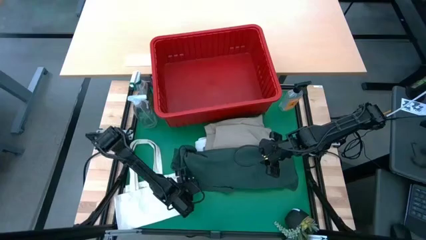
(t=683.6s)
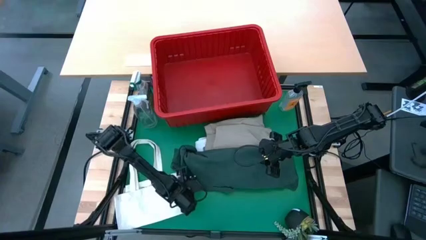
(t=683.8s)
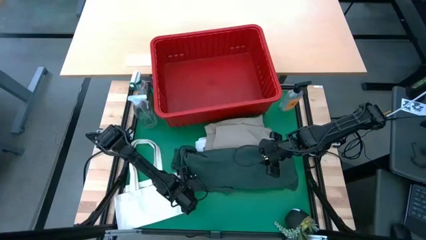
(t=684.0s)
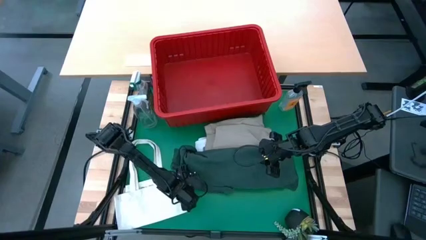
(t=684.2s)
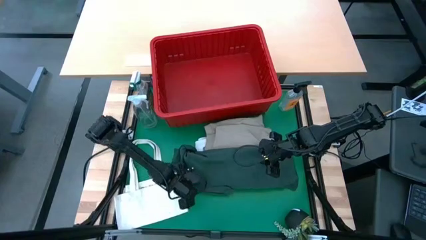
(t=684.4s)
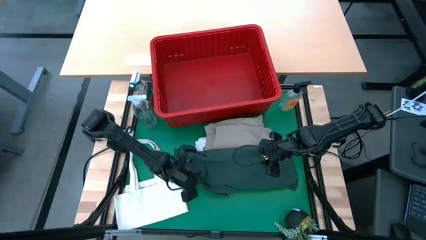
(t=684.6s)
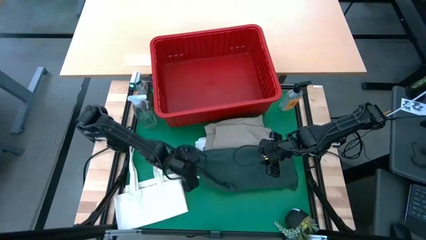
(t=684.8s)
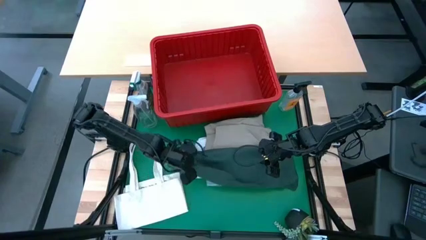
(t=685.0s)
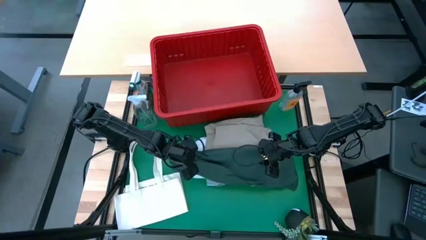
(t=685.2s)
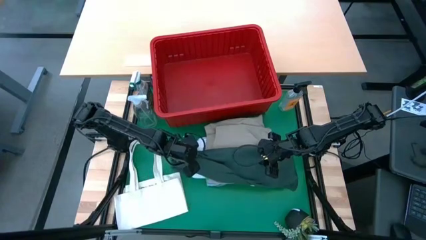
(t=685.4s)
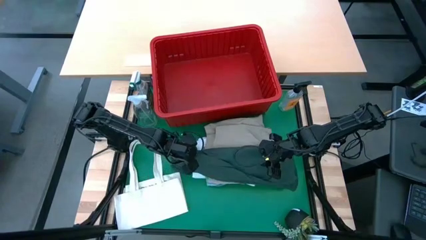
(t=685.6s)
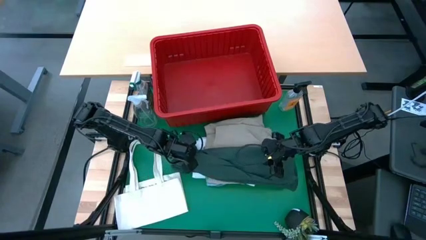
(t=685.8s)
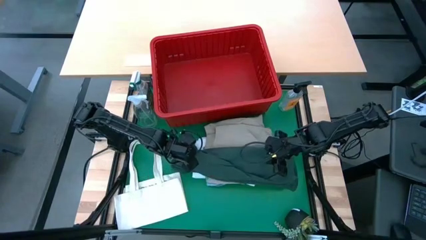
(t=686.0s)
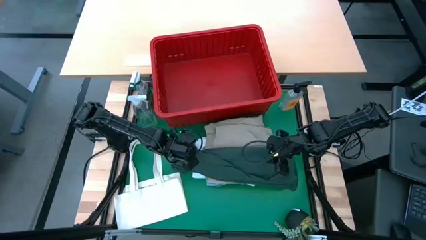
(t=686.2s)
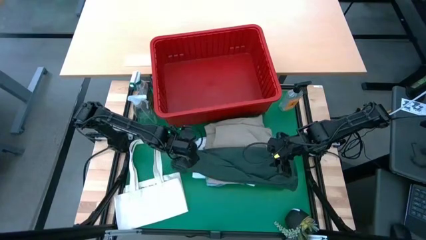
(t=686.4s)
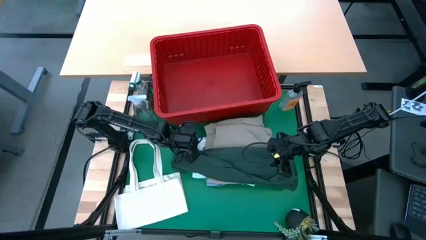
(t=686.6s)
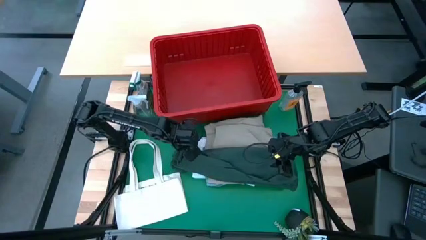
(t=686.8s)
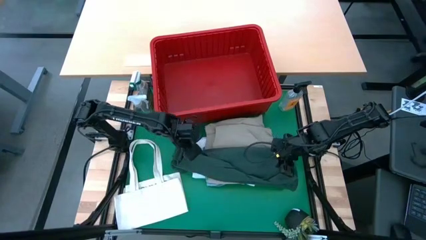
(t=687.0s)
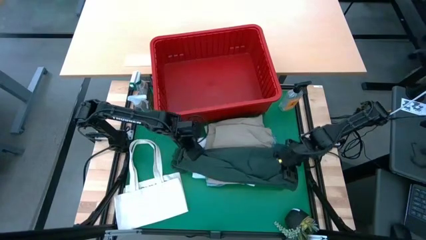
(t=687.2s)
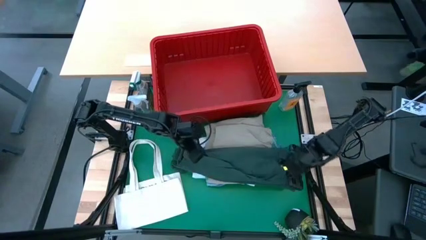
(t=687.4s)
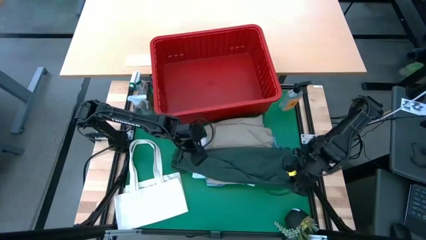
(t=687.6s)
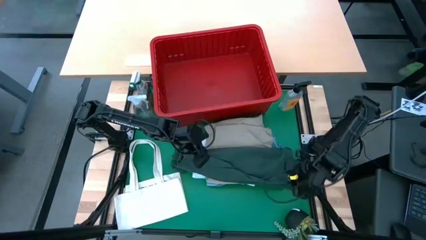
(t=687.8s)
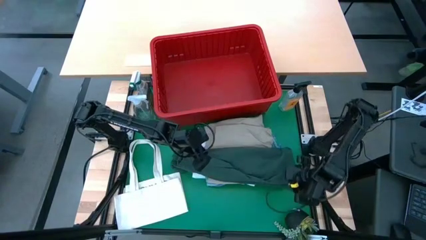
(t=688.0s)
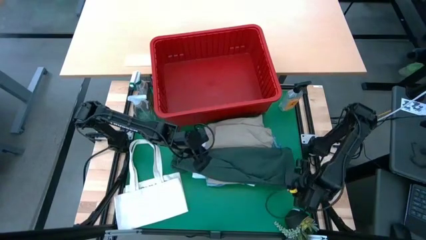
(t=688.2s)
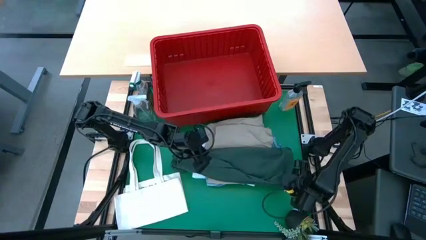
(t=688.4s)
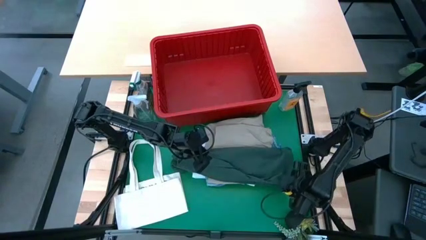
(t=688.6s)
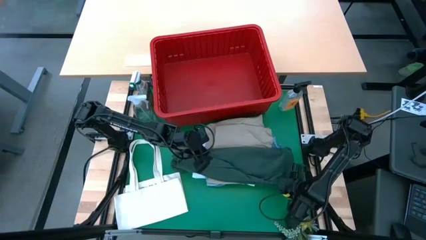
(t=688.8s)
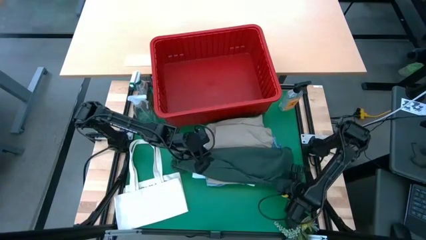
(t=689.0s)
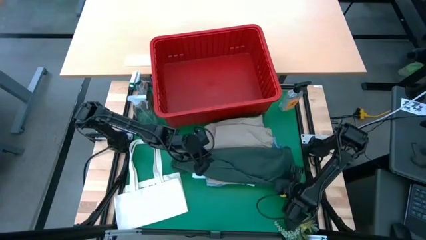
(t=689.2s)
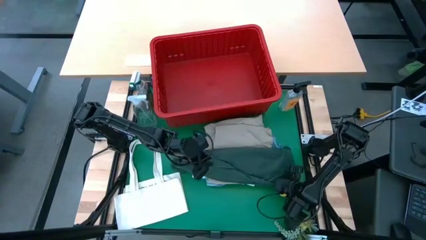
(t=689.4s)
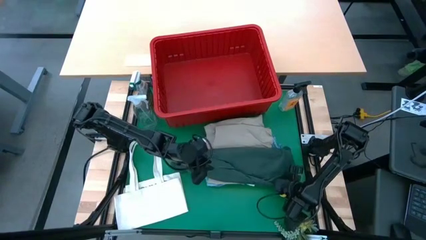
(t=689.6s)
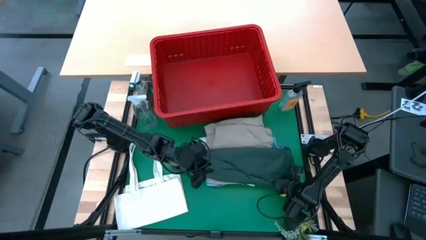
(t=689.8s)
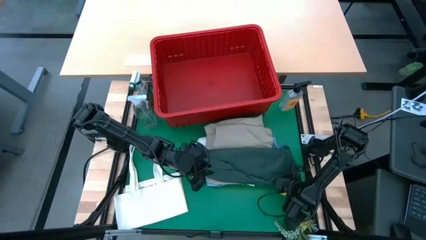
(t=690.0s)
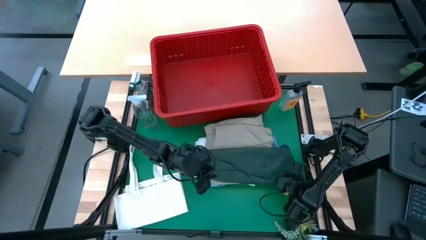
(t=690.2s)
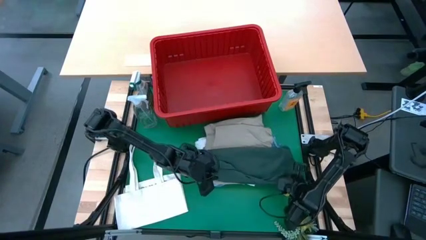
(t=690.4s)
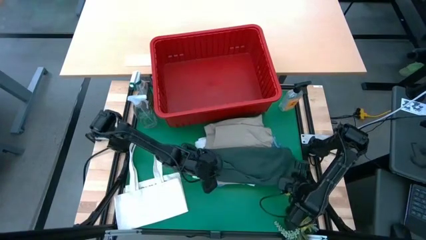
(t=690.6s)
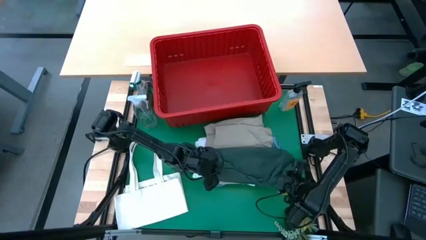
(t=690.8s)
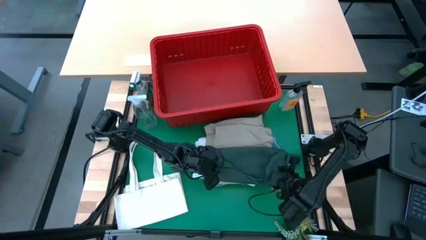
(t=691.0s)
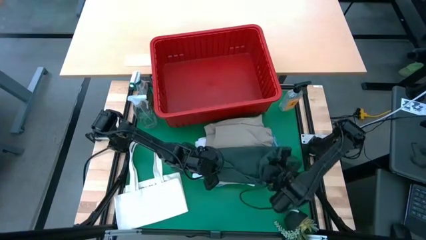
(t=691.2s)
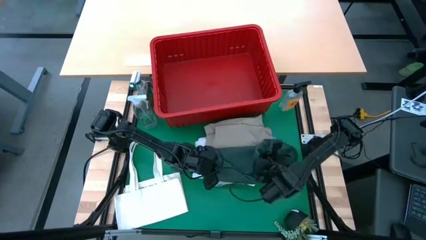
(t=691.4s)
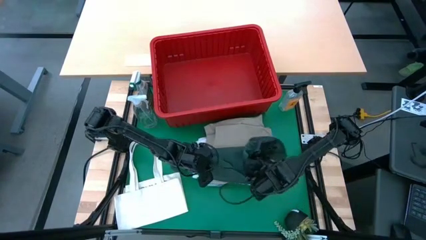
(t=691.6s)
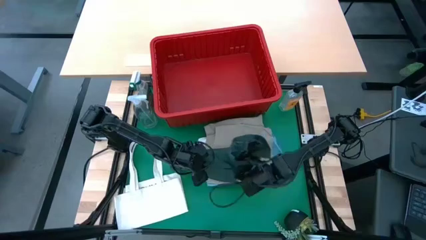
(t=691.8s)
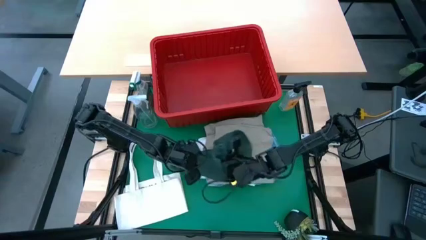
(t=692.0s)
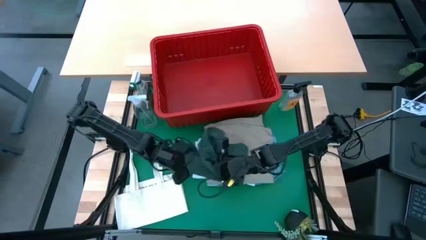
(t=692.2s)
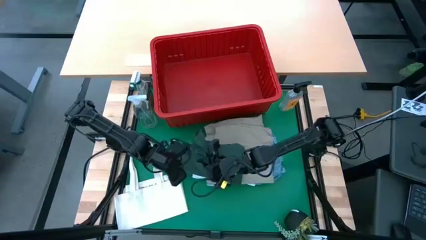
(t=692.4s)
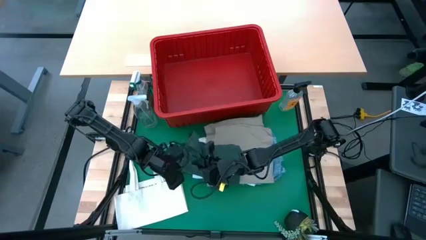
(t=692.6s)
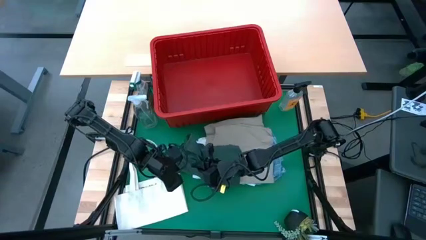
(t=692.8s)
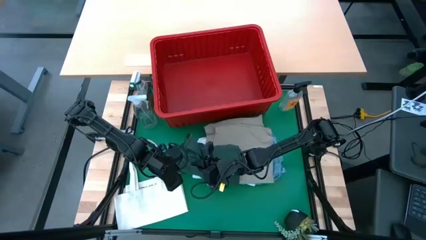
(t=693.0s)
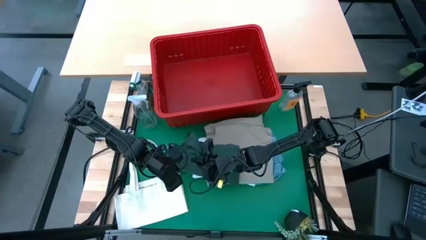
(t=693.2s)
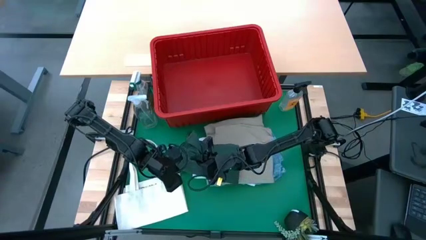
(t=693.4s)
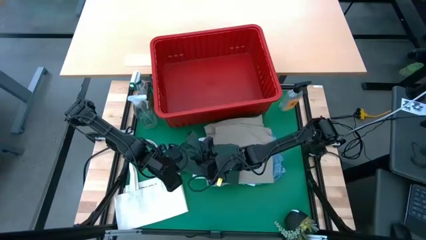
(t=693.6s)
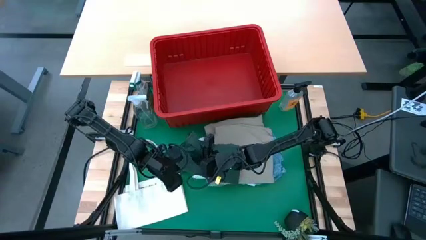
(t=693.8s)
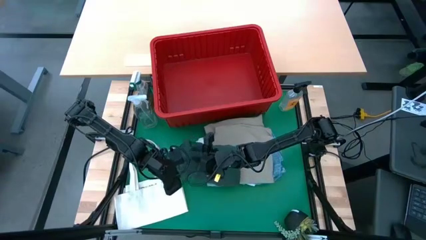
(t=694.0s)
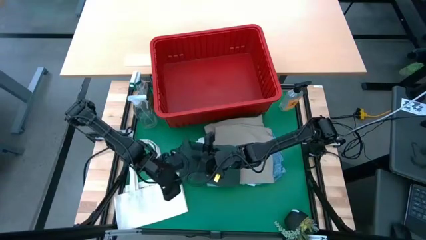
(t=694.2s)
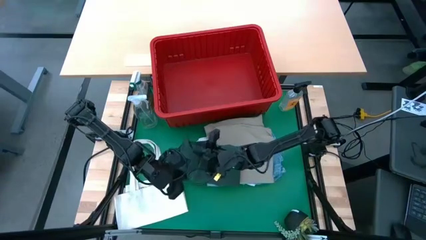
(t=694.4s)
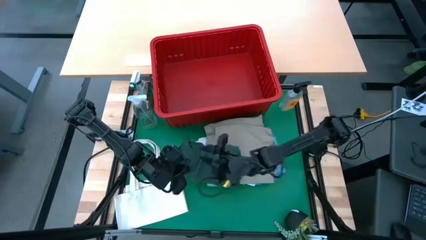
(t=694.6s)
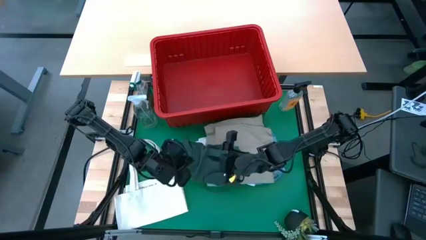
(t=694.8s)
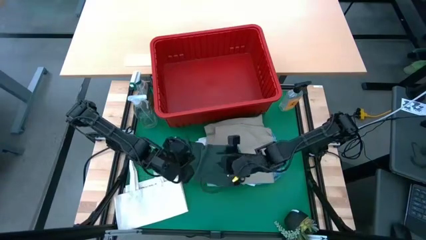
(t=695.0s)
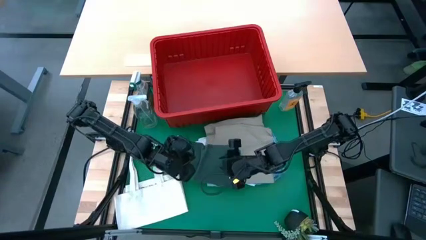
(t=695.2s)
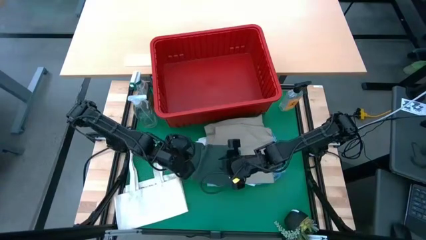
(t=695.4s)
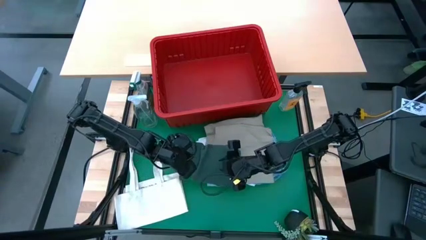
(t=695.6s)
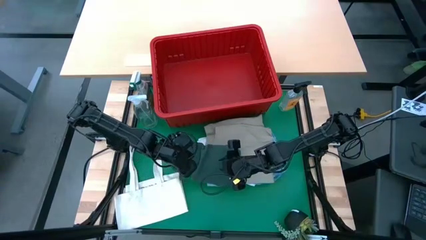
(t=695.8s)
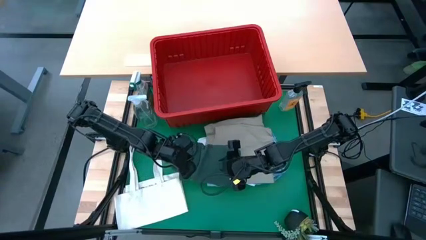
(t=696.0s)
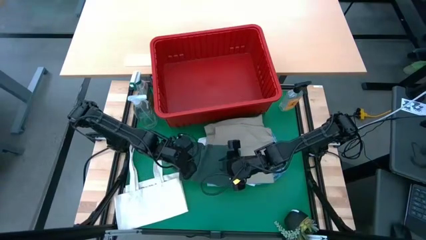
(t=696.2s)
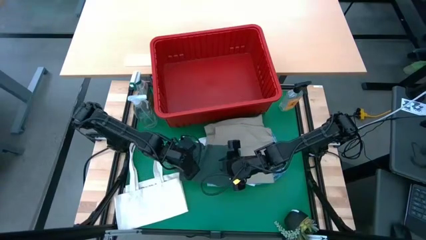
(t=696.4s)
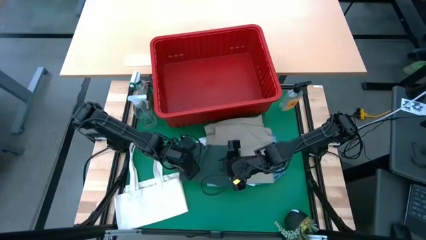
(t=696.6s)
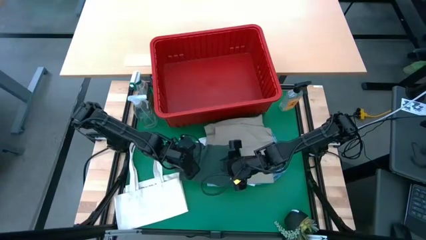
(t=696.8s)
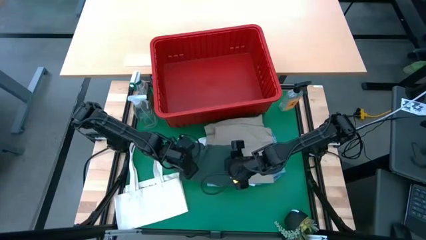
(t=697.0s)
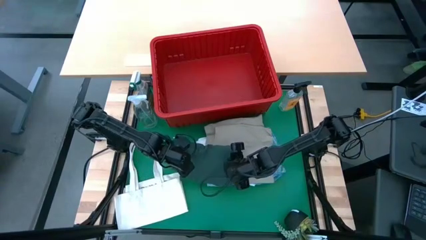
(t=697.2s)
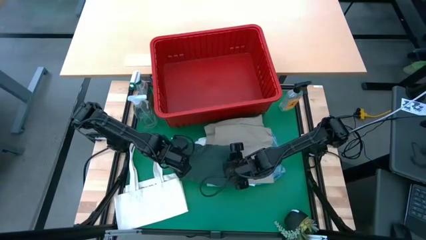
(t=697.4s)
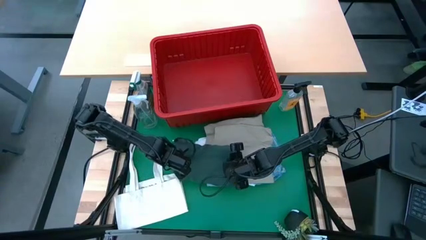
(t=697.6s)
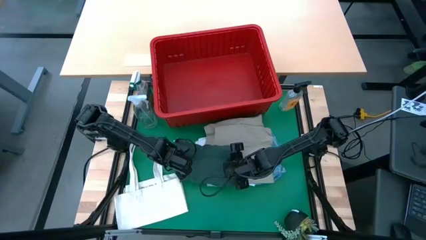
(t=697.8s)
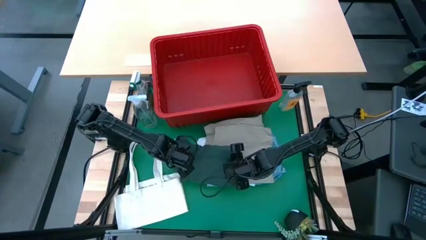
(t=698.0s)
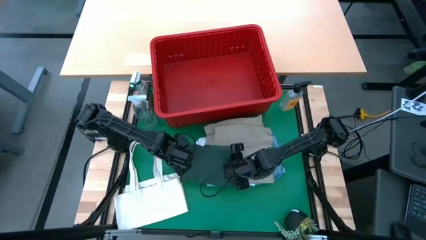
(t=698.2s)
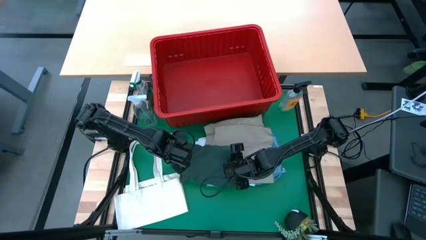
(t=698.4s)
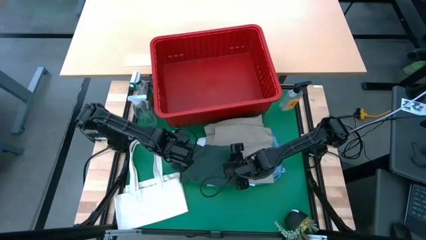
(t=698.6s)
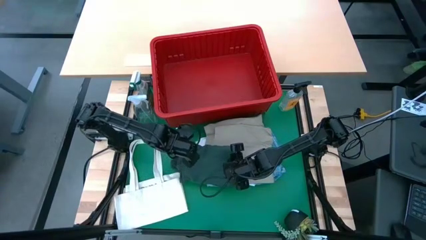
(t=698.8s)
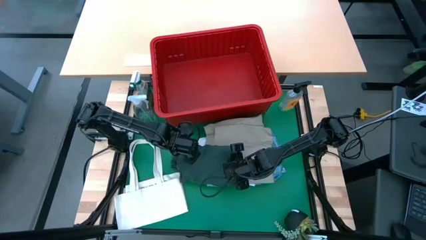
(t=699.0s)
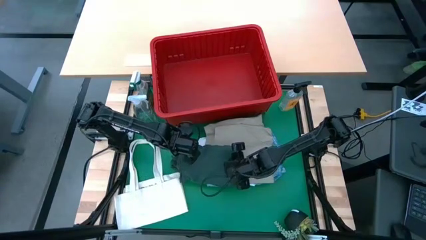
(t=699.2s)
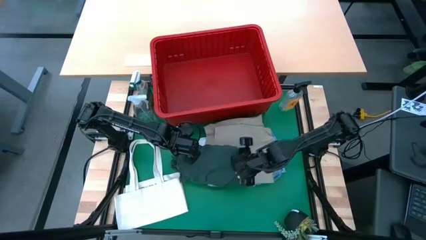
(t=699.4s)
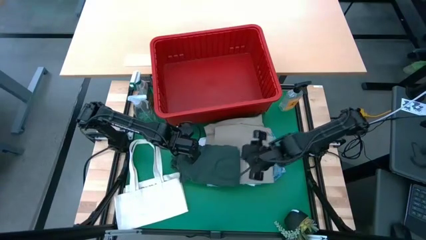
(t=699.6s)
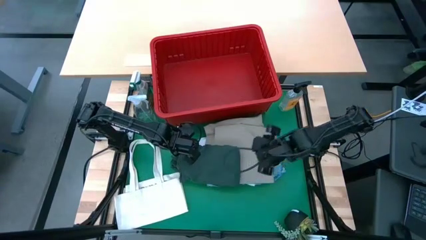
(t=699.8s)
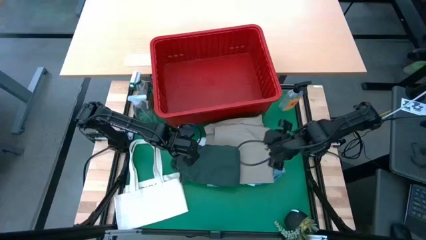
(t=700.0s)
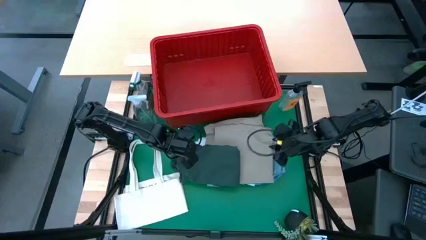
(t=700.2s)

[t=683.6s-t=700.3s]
Task: Fold Laundry from Bin
Fold the green polo shirt
